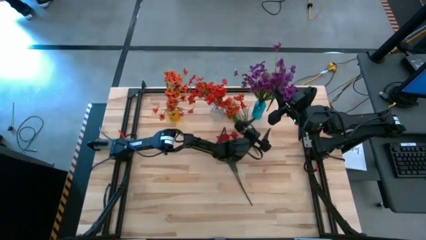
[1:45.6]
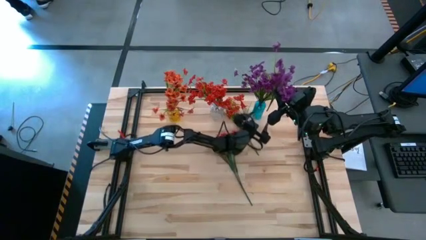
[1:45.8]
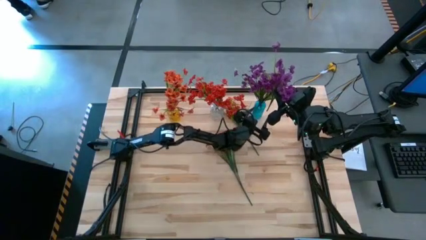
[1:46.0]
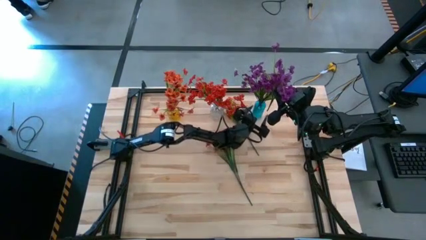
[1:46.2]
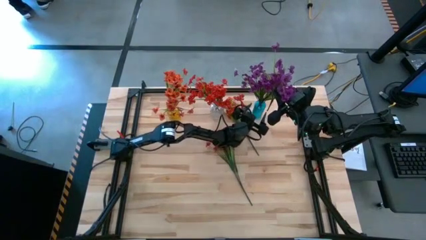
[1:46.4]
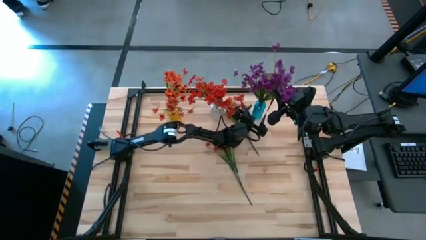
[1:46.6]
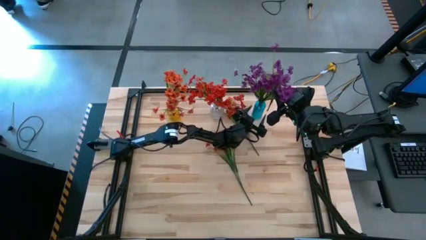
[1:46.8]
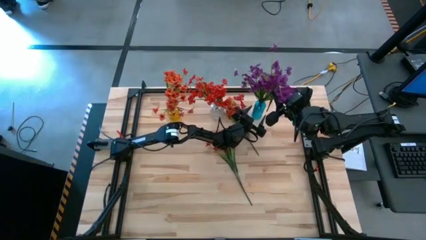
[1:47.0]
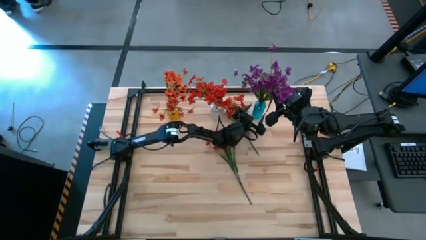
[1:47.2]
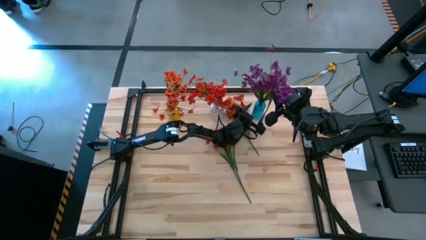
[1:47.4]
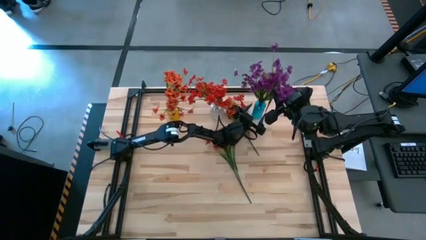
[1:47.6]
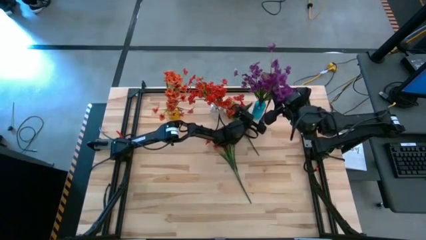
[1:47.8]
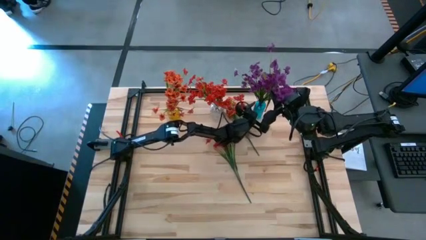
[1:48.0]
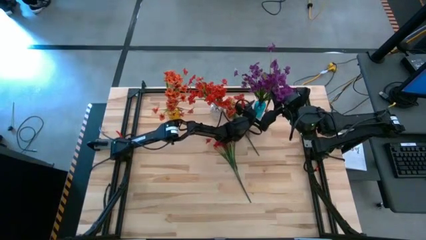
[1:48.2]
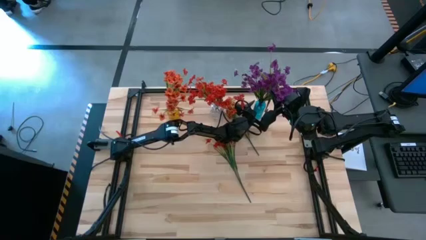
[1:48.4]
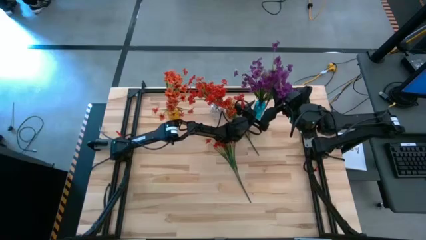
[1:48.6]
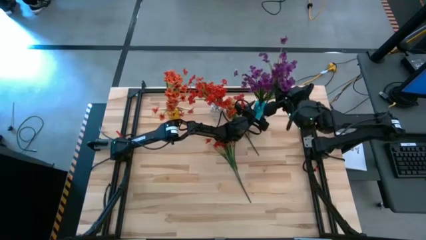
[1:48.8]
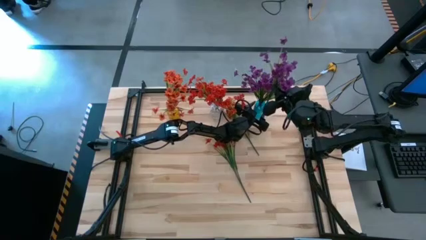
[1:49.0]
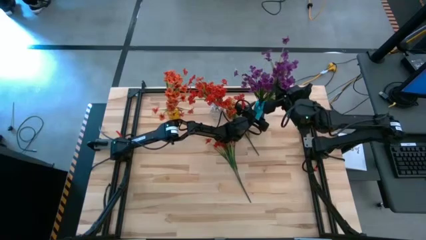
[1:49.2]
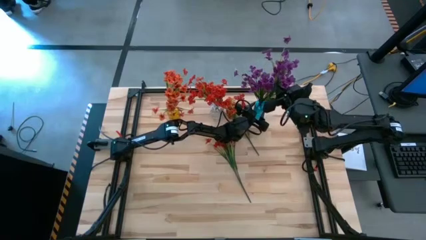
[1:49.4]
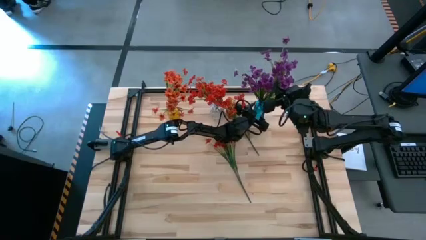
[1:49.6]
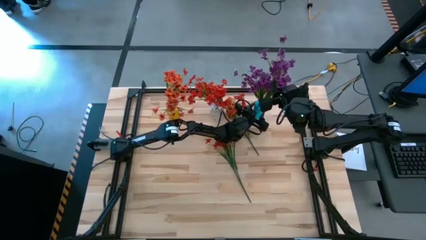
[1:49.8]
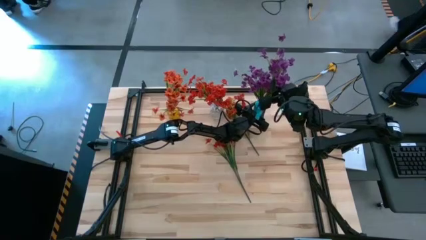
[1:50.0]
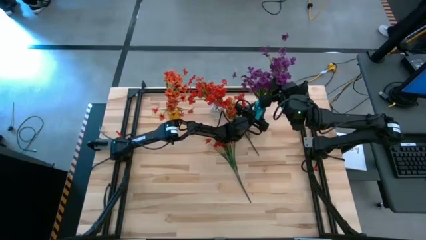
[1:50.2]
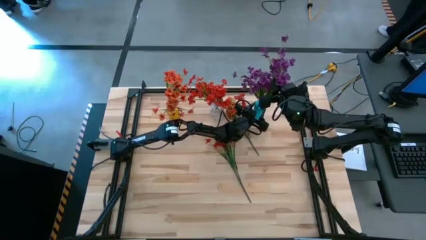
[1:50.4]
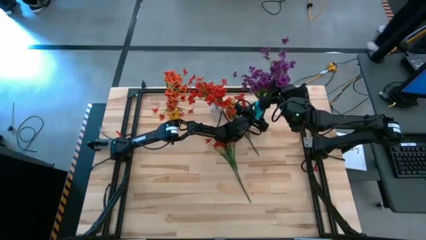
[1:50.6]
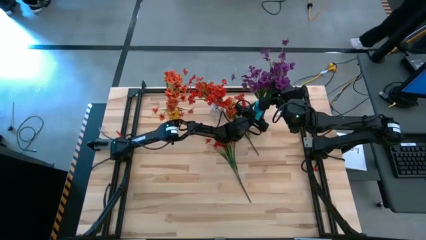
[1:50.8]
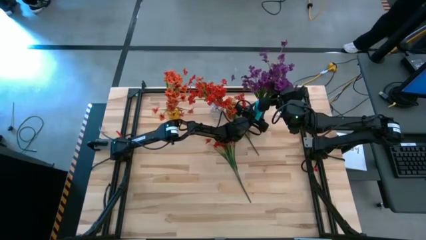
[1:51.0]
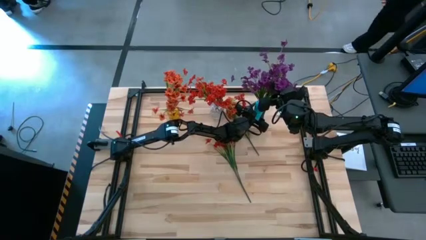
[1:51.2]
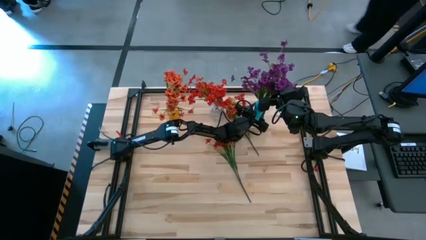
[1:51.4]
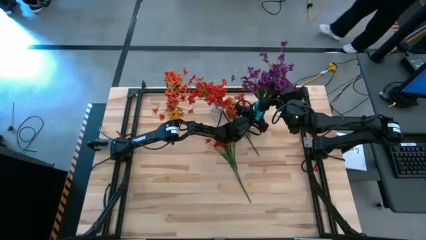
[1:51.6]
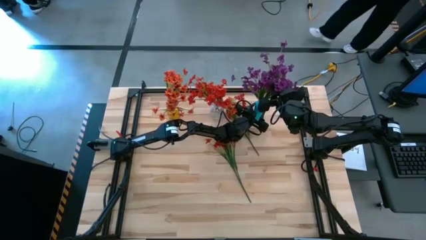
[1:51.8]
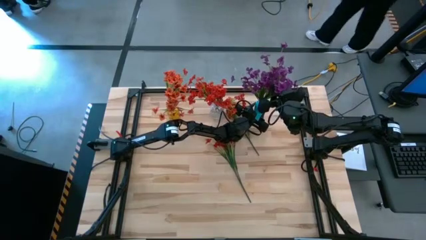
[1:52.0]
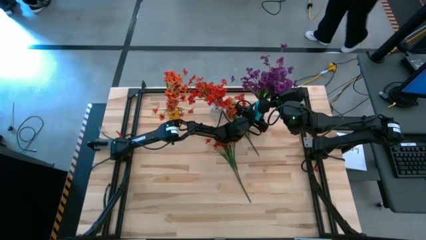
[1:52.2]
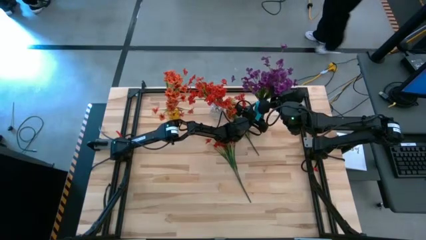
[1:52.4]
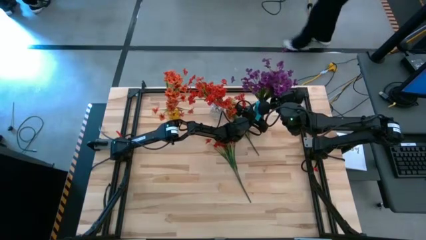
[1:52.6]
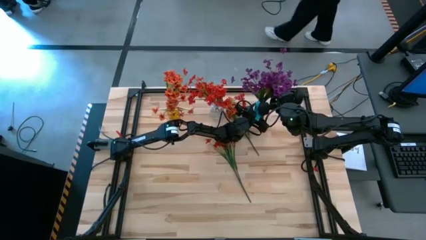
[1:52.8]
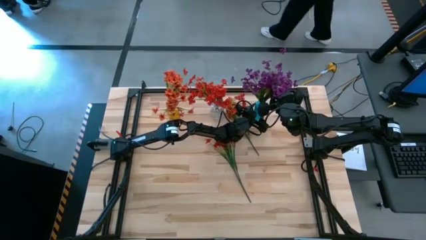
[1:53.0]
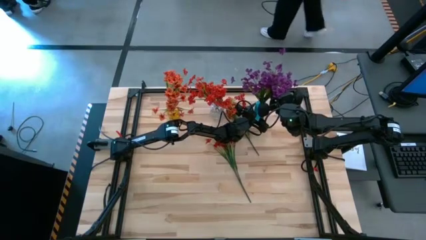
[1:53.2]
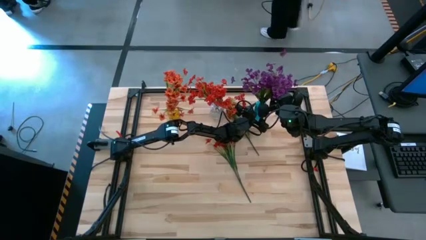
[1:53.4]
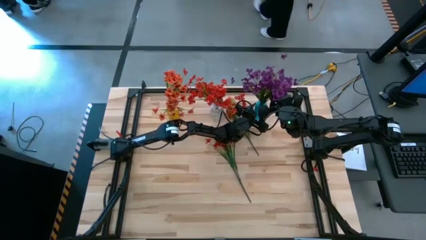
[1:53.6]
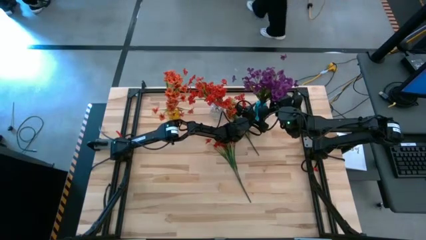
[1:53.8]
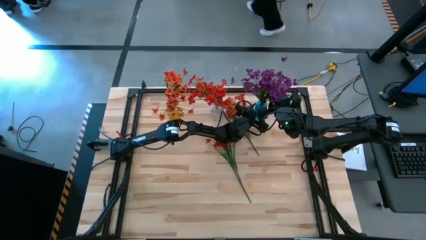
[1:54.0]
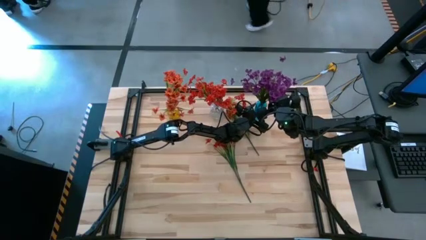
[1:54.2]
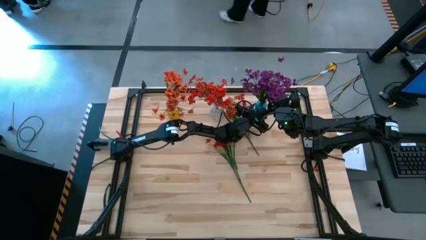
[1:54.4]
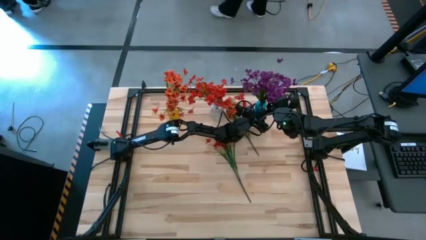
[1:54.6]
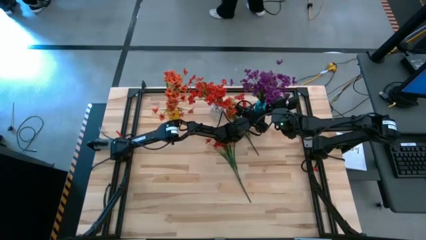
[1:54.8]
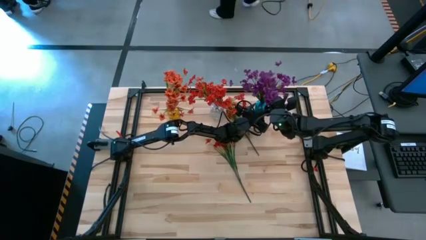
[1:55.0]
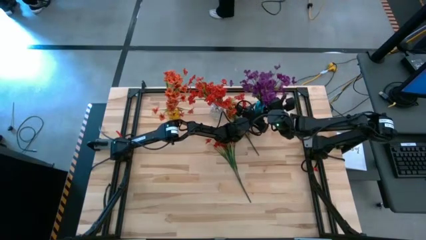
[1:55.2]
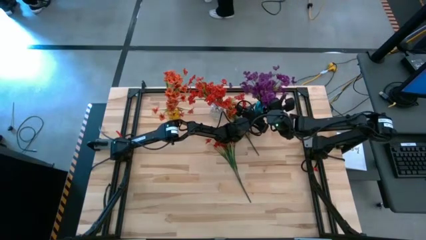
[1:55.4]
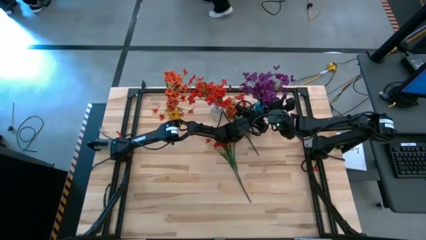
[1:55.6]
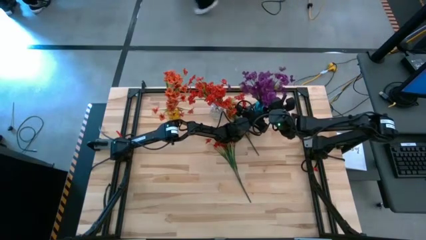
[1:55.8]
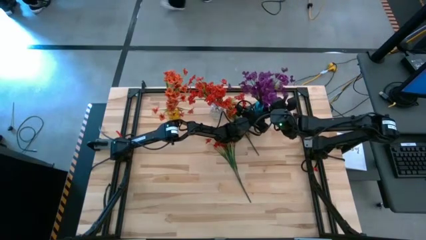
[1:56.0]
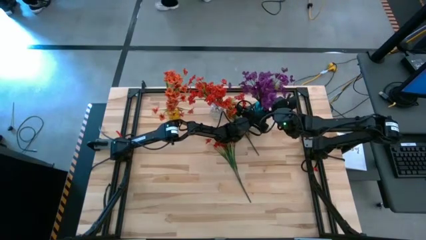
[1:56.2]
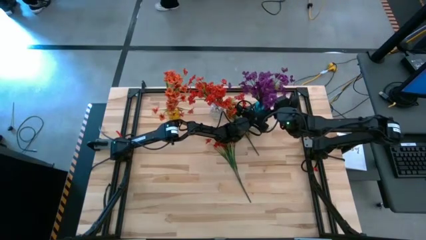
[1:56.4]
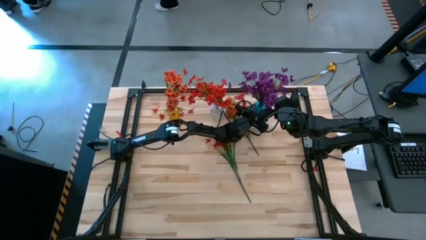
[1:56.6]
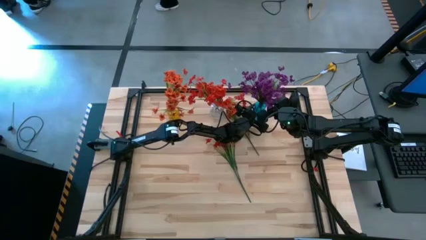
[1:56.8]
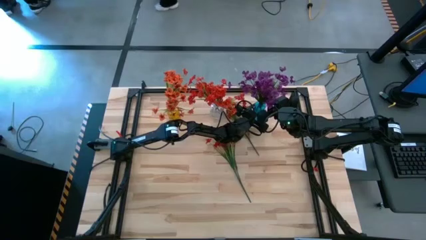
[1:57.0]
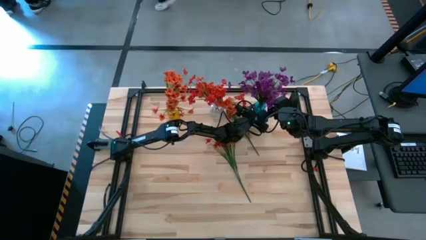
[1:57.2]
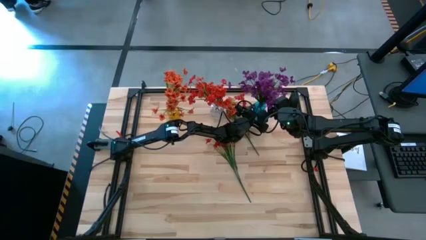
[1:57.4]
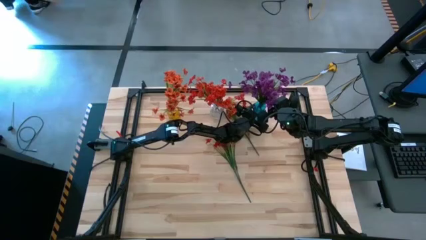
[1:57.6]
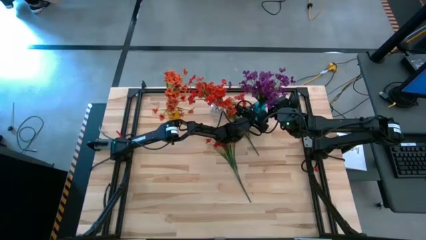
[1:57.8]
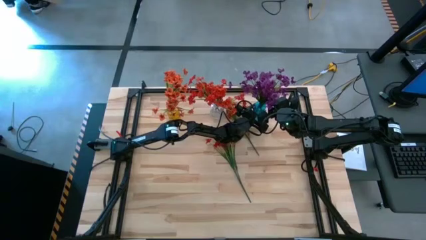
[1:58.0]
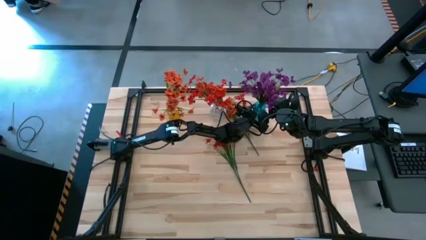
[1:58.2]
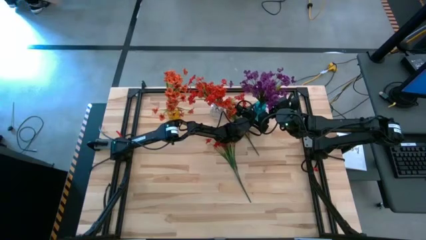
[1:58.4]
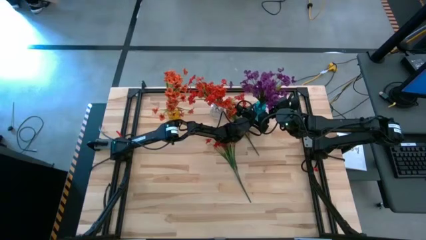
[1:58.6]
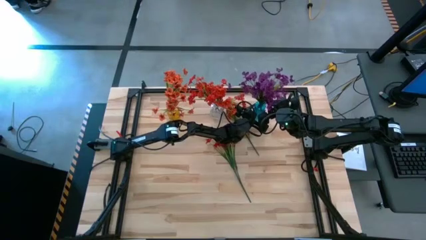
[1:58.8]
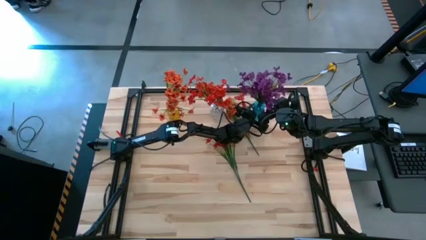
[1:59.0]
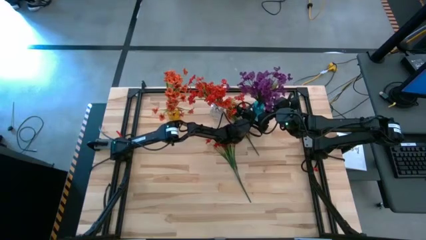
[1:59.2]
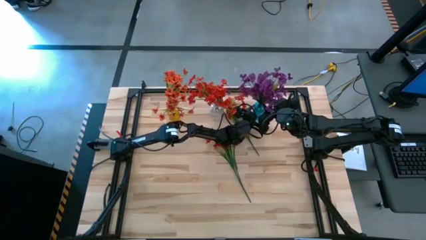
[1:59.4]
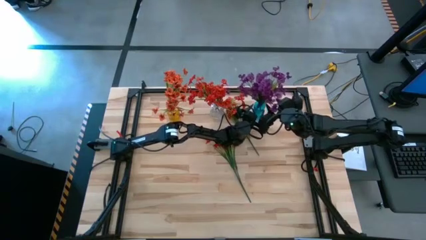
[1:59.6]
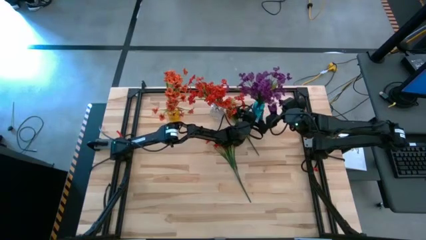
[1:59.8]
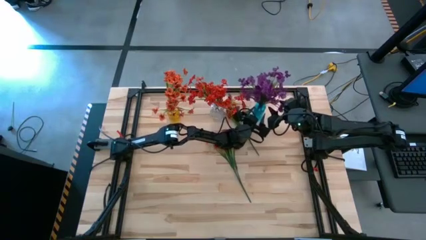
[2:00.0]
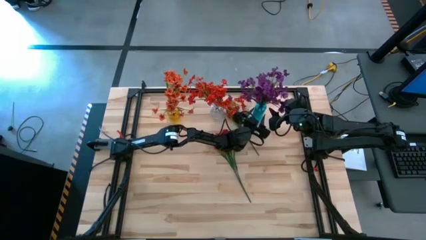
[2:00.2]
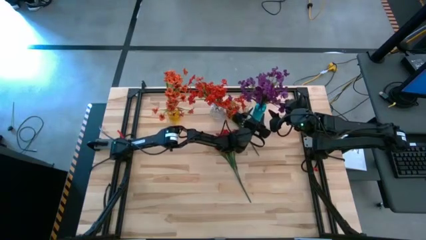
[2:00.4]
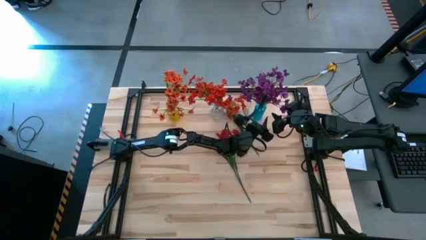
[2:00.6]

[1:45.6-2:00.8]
Task: Sort flowers into vase by color
Put the purple flowers into the blue vase
